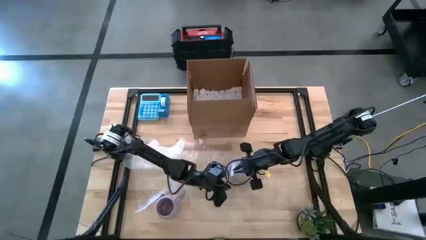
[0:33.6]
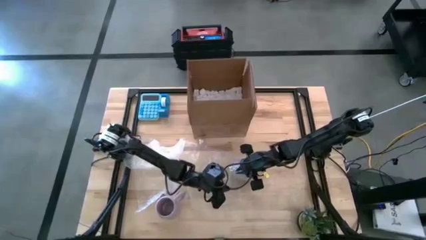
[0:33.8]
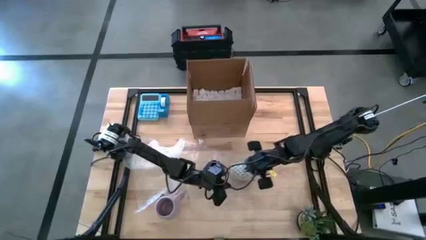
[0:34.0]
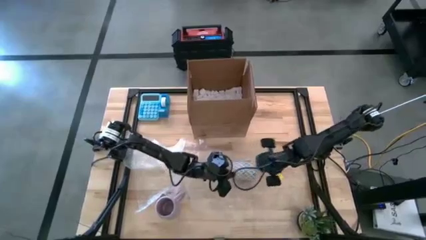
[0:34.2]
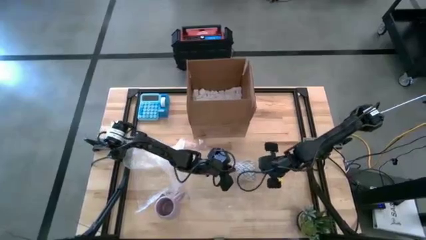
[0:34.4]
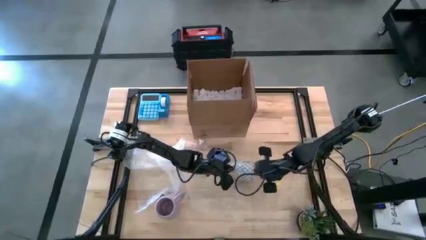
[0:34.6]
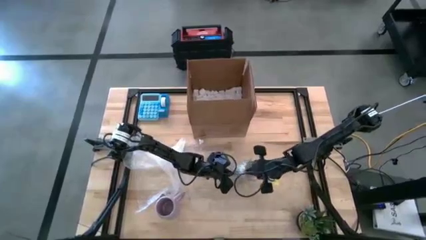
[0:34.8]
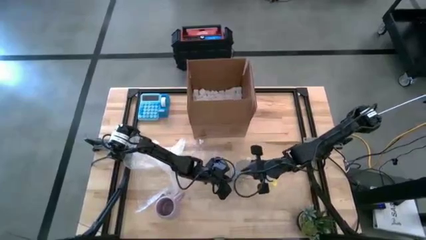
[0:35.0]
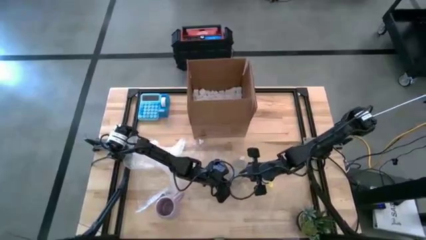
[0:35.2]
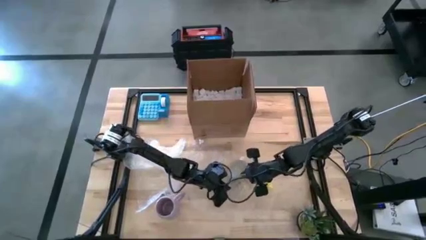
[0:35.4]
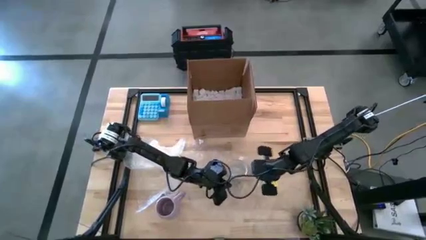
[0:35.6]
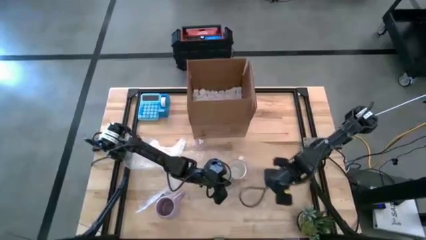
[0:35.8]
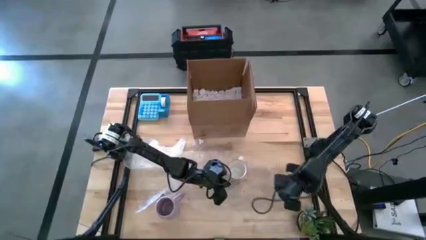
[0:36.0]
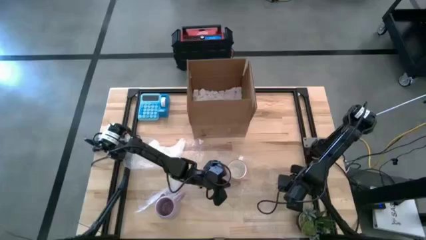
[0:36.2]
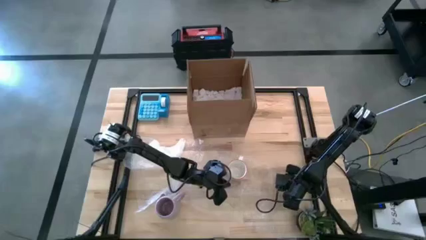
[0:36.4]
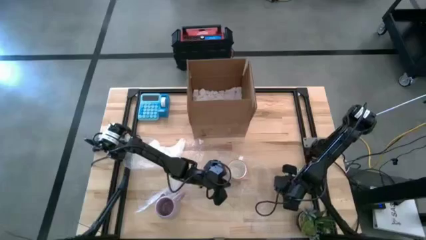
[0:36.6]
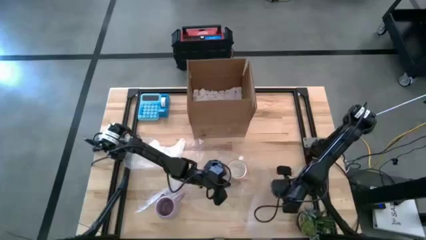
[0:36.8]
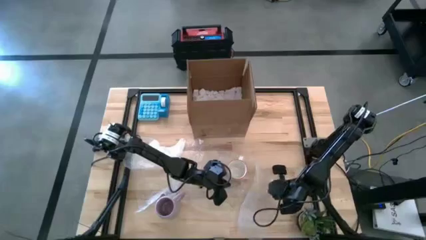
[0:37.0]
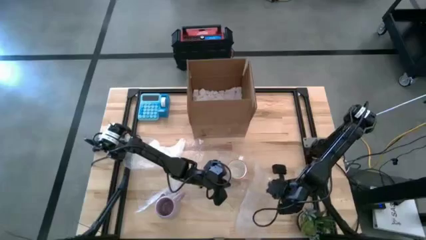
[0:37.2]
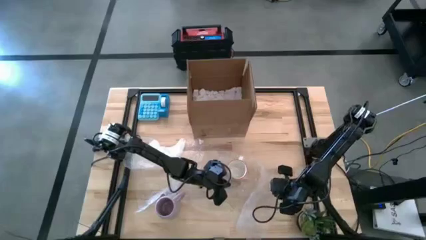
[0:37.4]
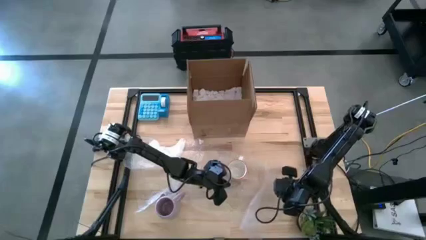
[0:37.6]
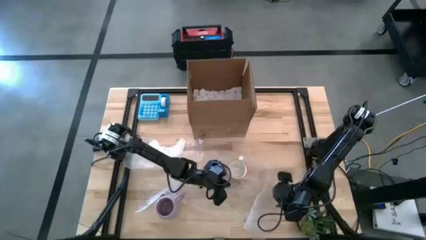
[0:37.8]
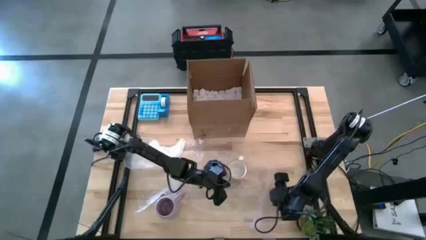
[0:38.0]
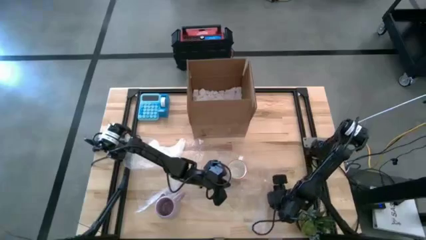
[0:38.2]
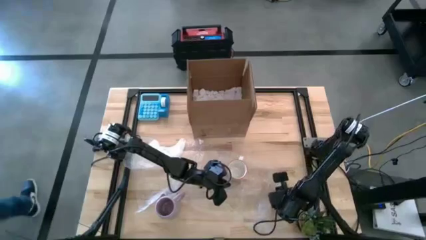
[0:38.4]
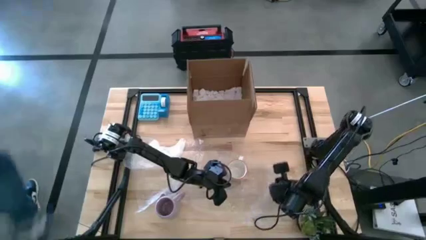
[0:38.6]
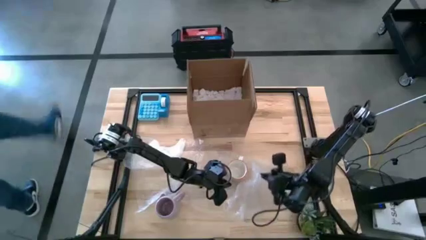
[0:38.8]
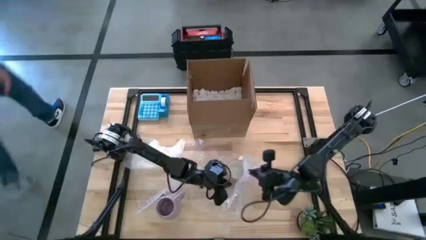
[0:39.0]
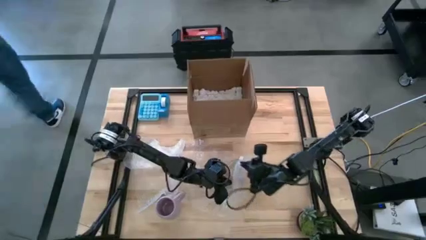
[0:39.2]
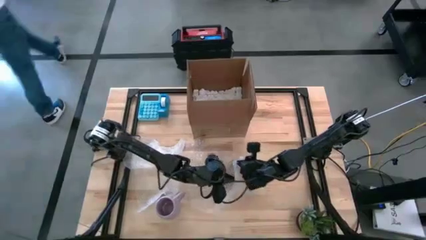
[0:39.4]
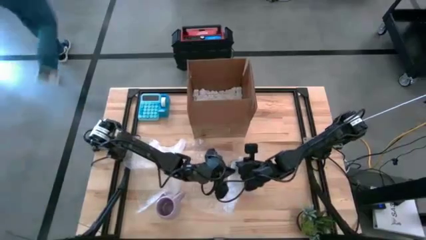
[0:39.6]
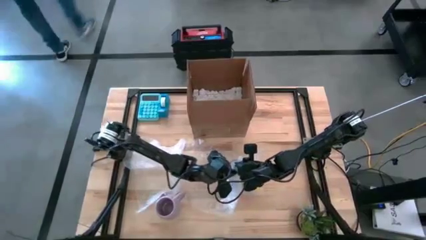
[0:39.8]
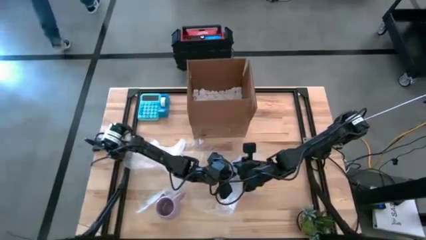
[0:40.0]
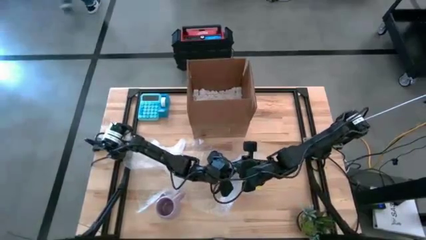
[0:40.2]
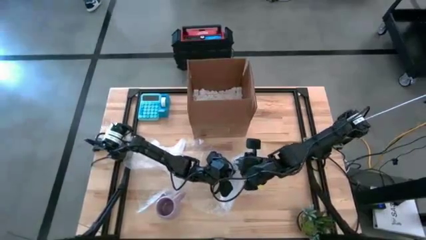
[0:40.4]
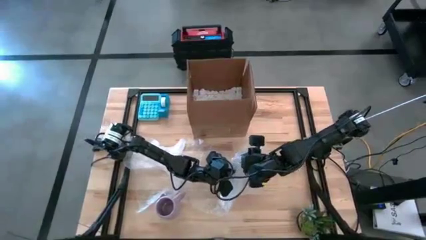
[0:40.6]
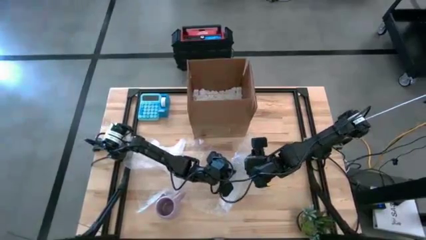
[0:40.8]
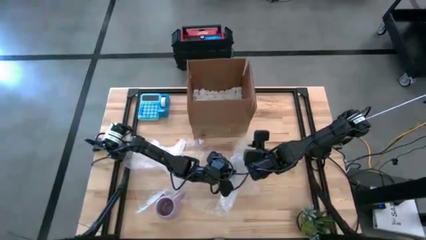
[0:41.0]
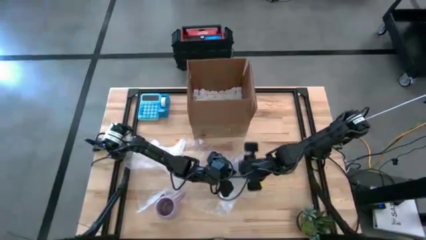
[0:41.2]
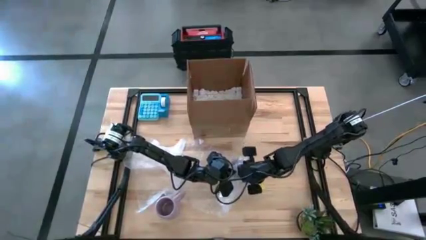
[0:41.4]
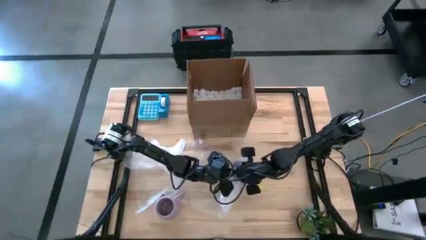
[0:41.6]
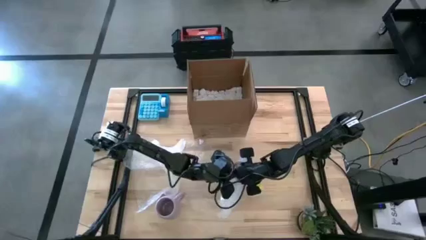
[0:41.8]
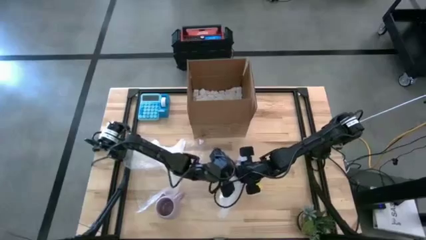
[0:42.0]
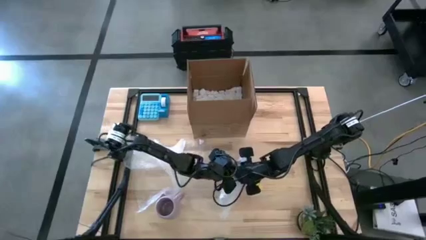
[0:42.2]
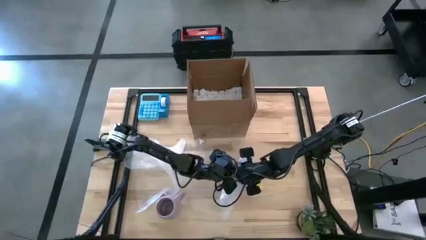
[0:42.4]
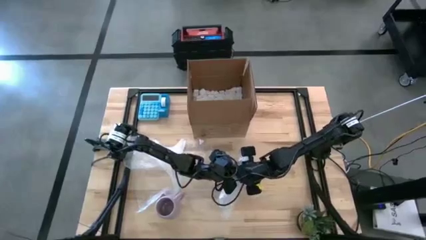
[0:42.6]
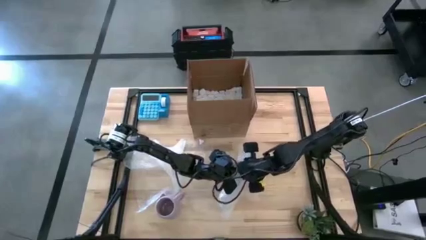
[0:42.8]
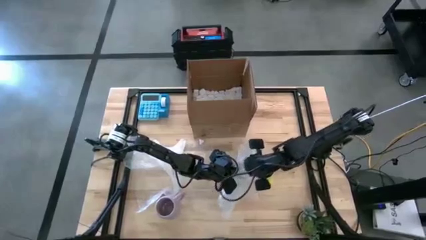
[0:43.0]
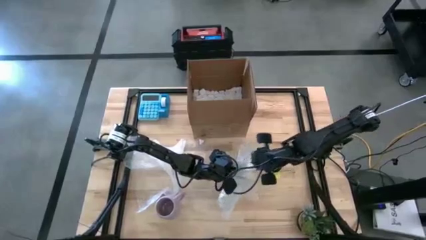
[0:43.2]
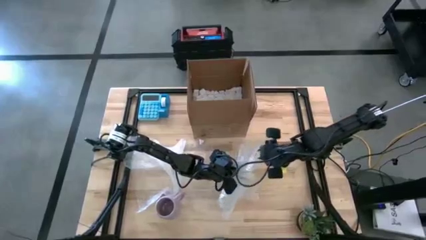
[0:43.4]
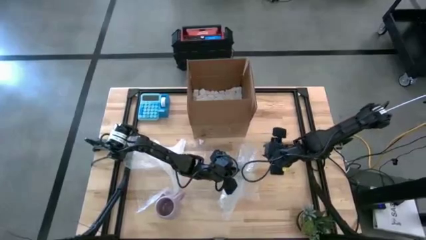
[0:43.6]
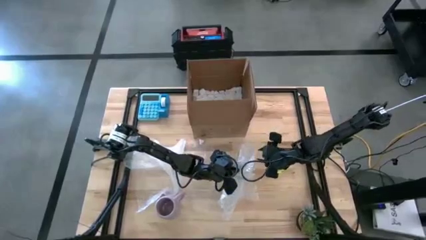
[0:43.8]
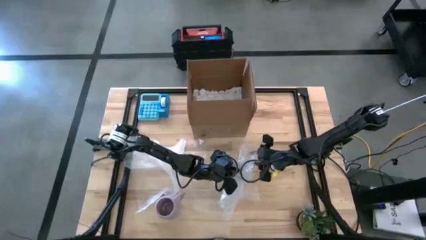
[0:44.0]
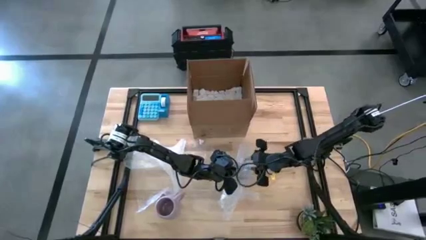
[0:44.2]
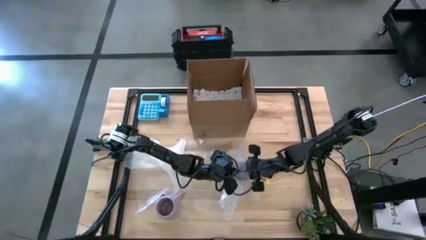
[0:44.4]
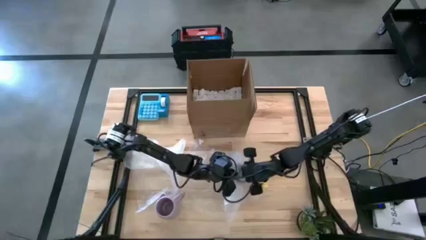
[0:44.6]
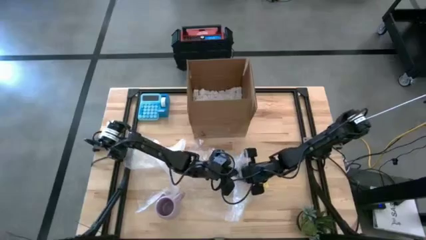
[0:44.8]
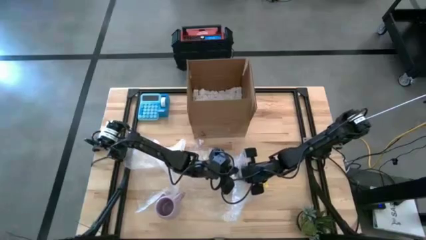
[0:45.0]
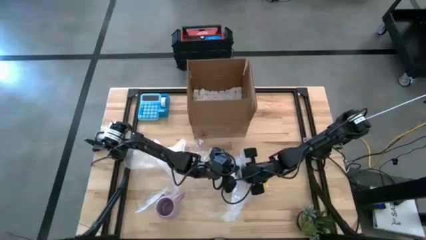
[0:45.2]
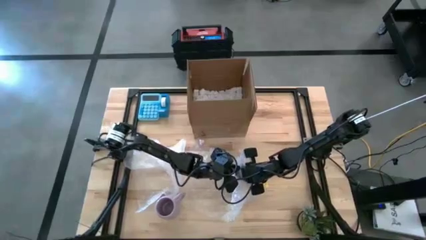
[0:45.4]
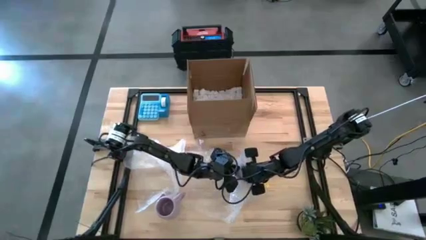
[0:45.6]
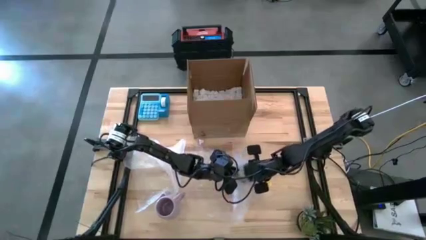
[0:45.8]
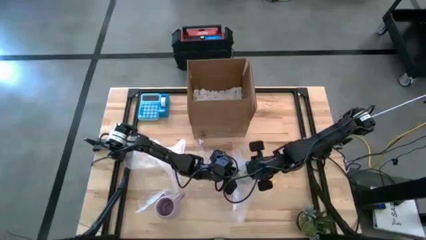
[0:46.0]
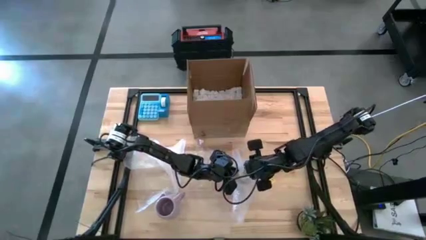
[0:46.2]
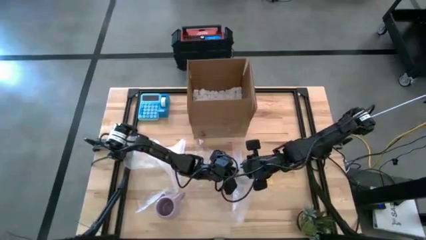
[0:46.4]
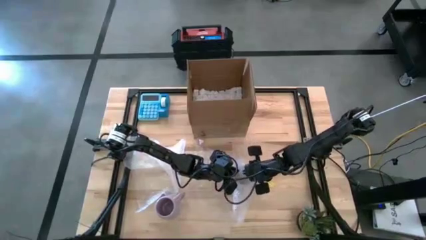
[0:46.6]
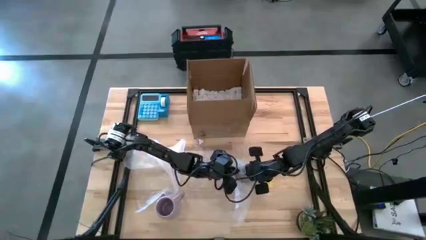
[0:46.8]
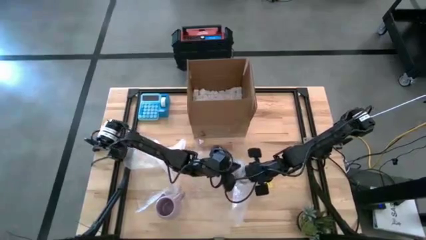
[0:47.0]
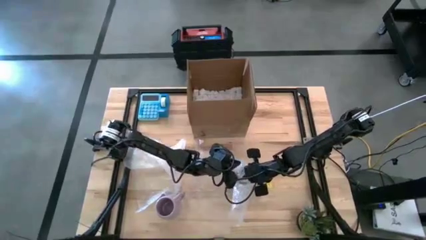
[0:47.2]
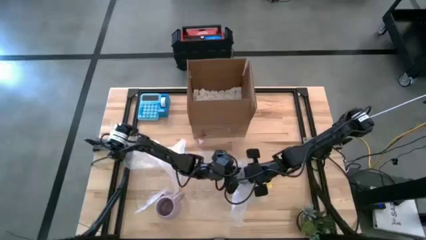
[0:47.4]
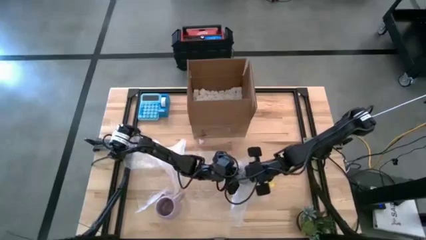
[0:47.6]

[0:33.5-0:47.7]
Task: wrap mug
Wrap the white mug with bubble wrap
